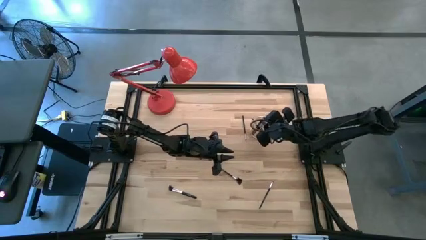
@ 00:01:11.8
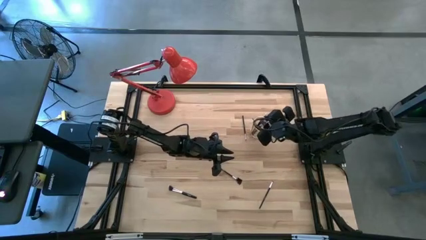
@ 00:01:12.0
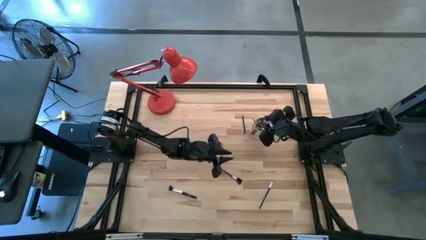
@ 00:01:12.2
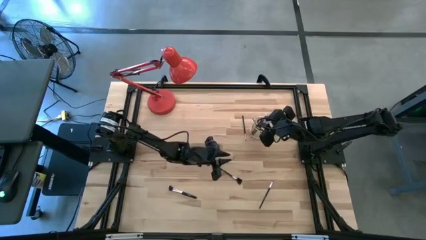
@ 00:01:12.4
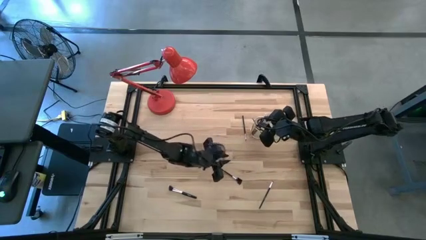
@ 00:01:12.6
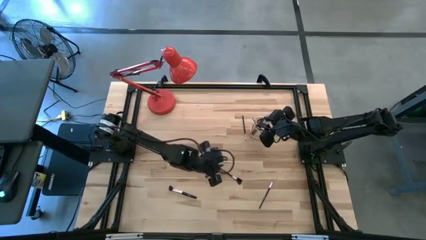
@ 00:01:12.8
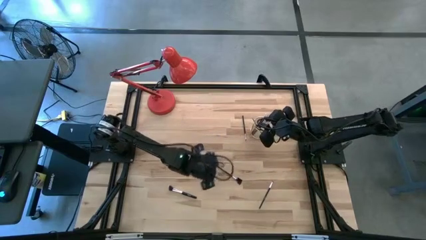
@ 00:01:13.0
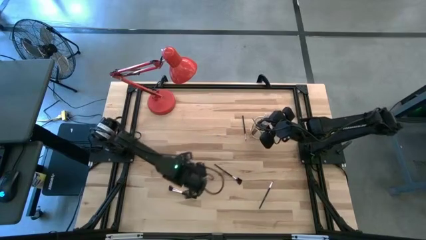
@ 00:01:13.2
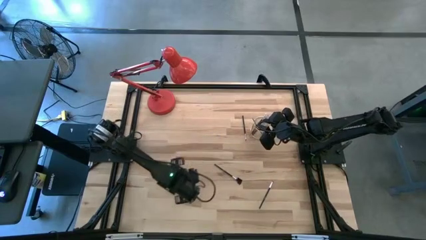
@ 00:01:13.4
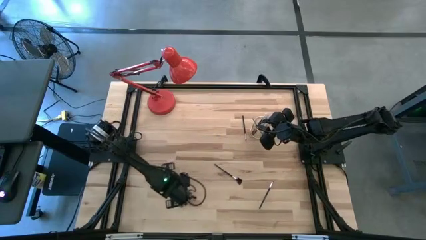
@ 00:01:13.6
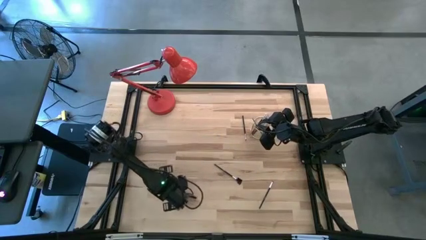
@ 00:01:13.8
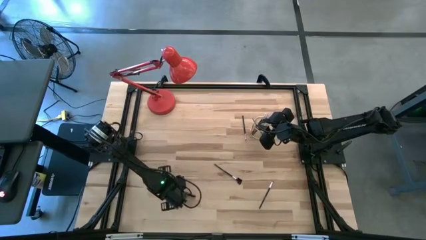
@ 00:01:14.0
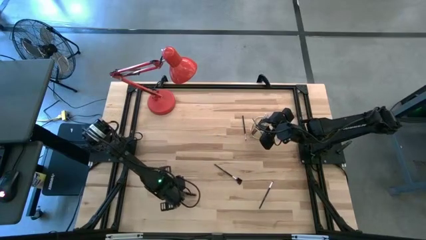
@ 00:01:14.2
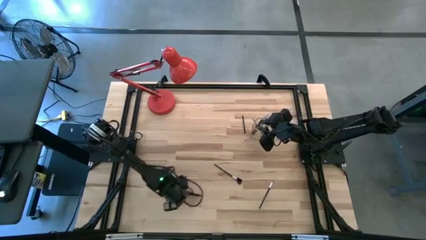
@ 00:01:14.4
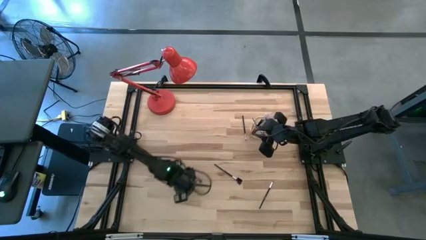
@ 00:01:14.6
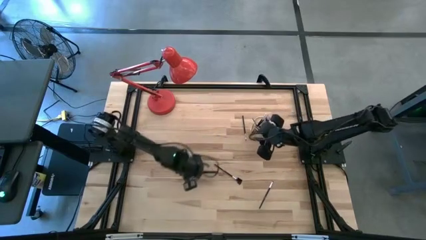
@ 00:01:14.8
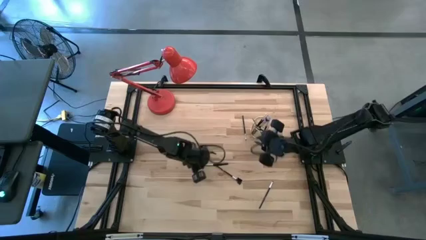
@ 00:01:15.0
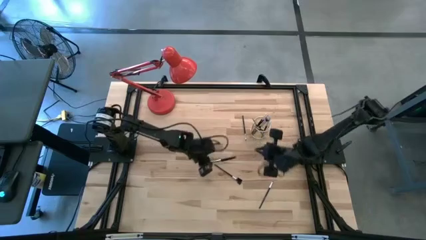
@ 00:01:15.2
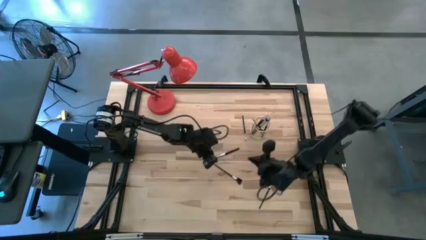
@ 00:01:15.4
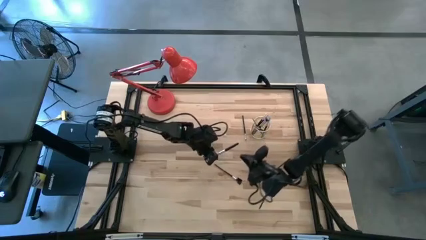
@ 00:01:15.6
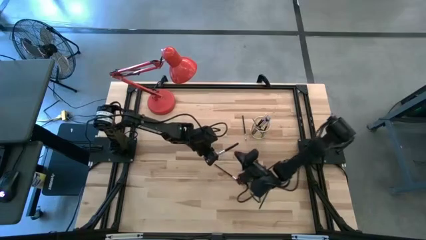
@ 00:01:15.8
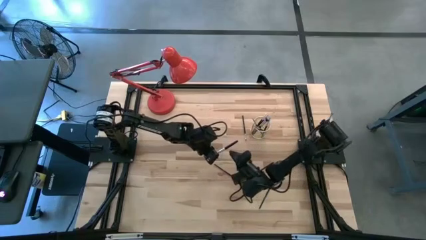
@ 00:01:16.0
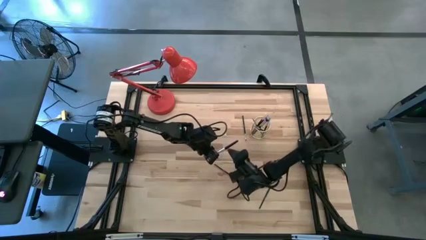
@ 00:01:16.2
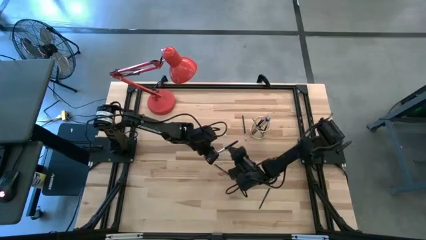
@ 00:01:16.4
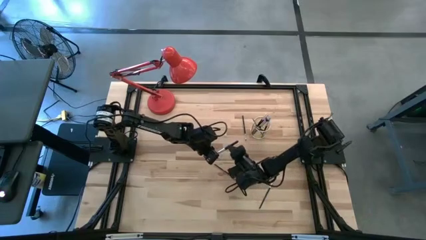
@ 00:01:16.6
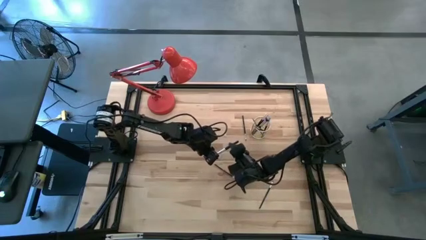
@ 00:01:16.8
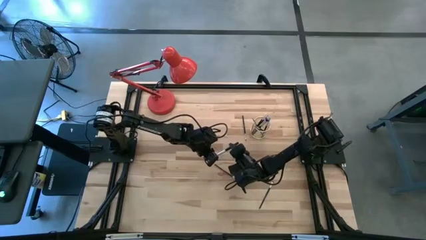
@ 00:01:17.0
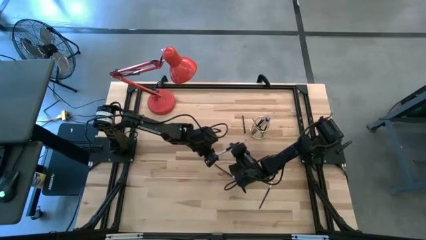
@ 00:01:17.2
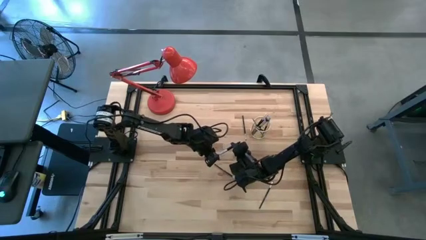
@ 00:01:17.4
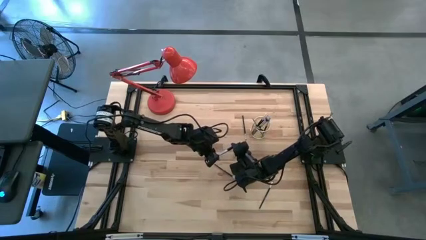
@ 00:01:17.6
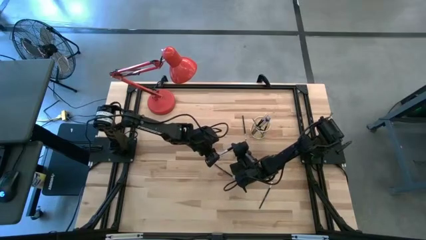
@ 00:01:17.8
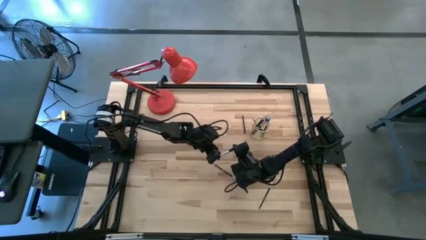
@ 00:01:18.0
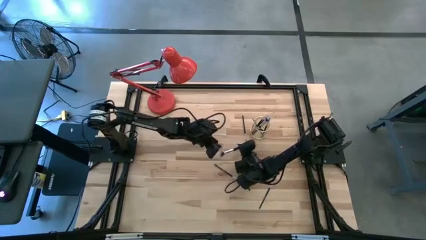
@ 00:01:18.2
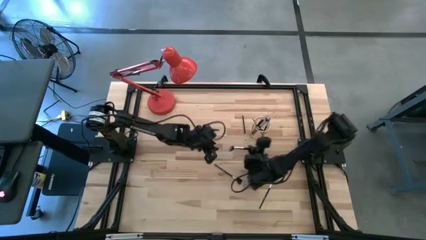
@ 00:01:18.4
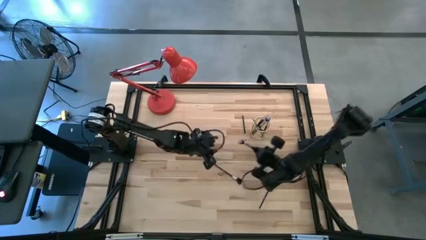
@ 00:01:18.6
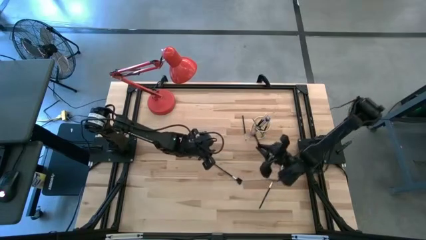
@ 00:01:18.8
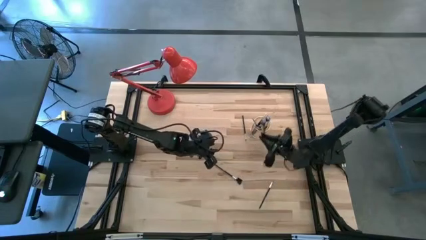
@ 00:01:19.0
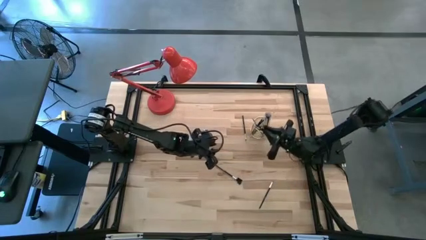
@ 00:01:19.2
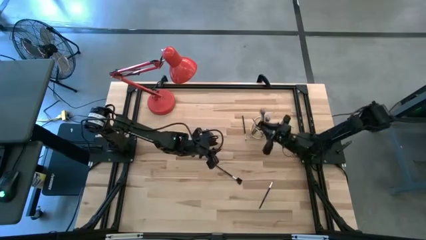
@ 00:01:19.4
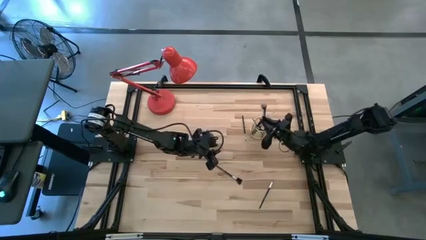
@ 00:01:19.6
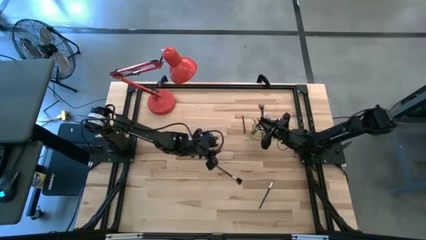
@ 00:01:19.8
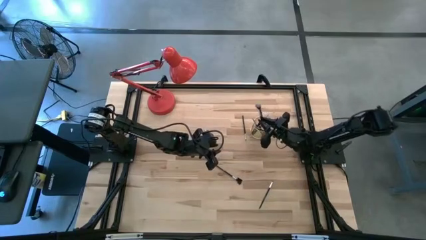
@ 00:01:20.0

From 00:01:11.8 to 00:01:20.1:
Task: Put items in baskets/containers
Put the black brush into the gold holder

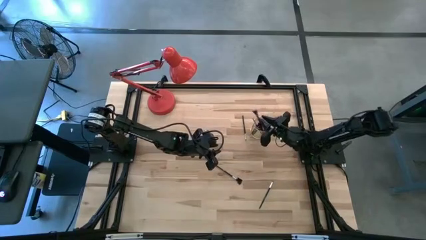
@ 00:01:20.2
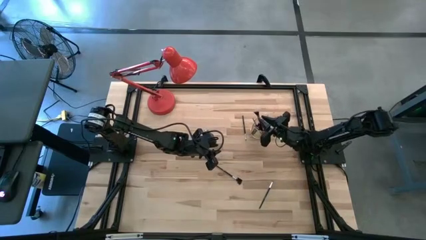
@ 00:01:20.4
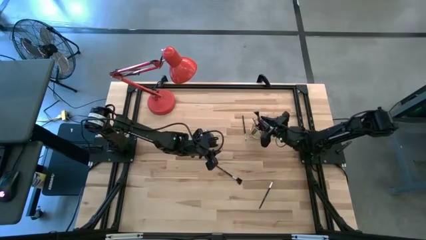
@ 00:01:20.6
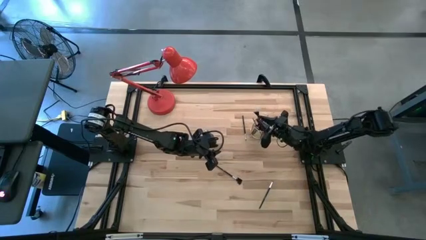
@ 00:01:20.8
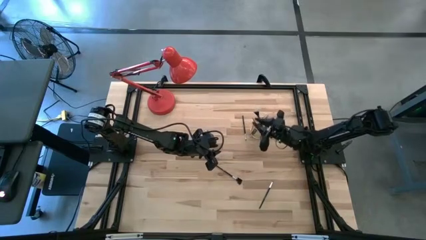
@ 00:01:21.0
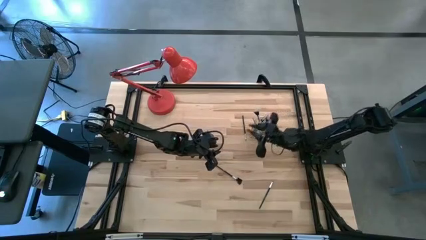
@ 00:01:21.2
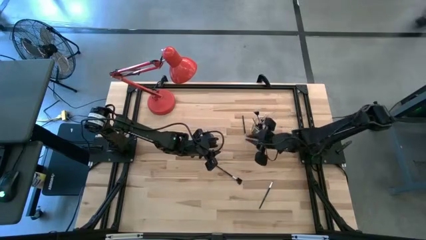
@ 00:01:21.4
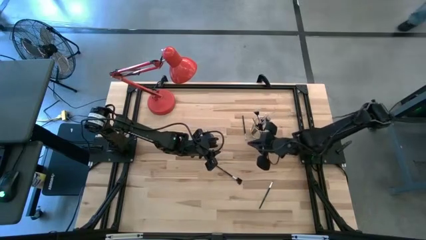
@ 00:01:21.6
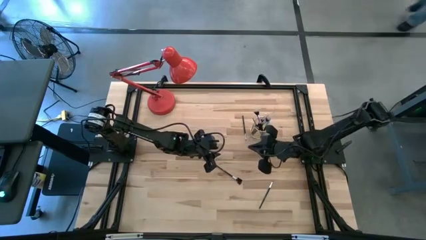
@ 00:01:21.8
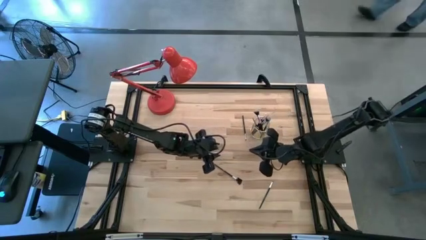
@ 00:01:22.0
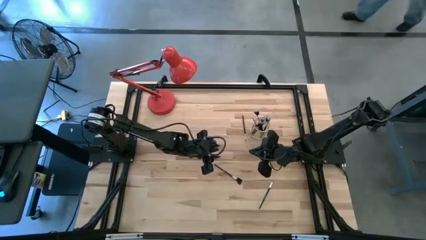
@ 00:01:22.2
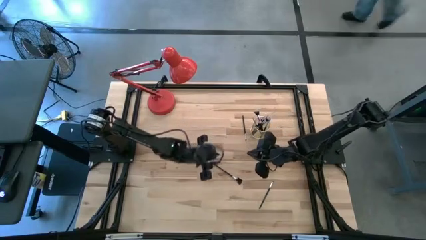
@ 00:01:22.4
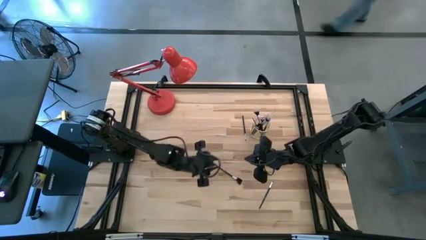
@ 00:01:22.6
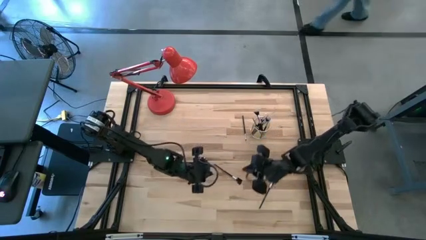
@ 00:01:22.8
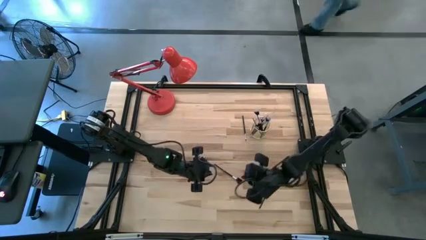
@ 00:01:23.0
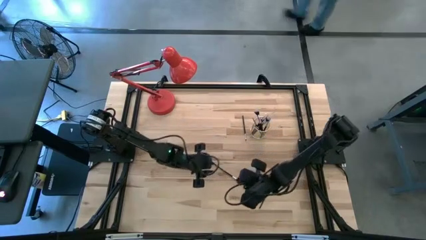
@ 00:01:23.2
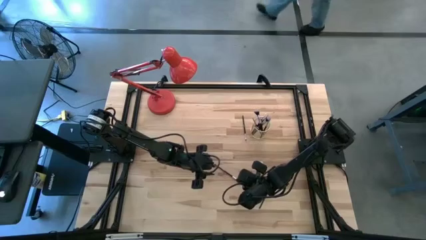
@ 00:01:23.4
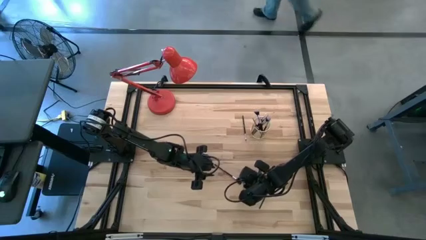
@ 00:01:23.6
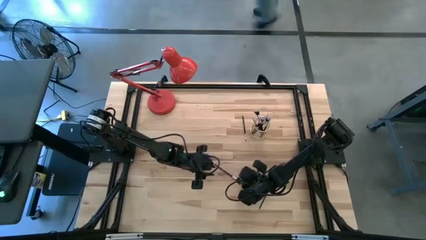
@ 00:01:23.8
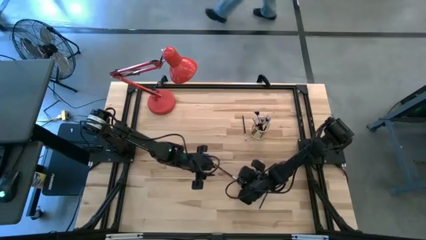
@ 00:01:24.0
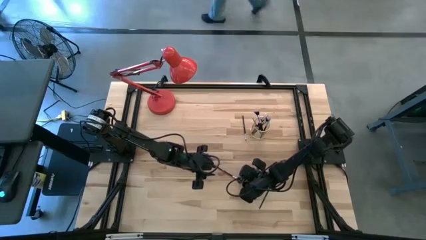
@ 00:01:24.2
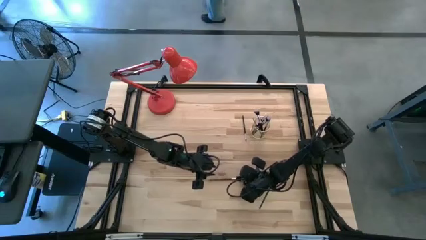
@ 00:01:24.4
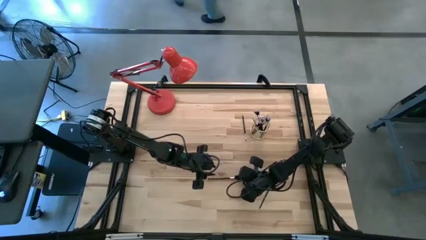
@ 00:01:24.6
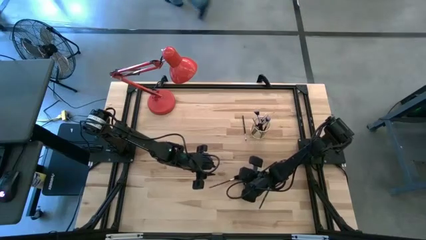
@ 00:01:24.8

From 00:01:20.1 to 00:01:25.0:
Put the black brush into the gold holder

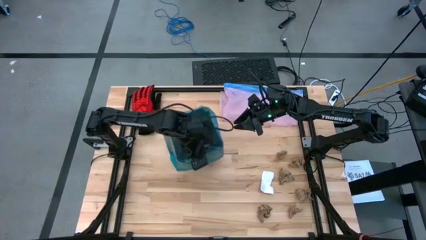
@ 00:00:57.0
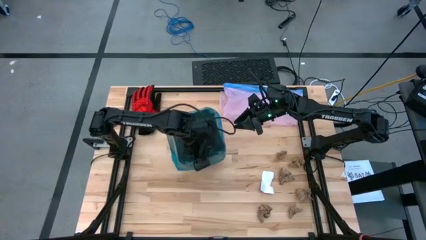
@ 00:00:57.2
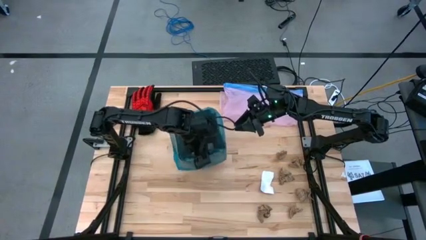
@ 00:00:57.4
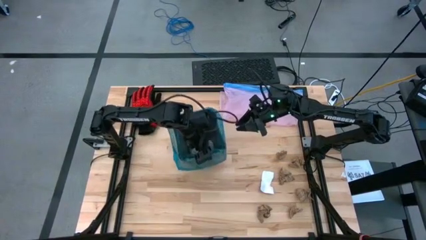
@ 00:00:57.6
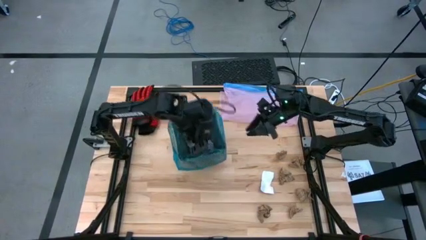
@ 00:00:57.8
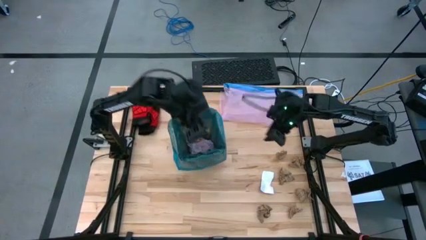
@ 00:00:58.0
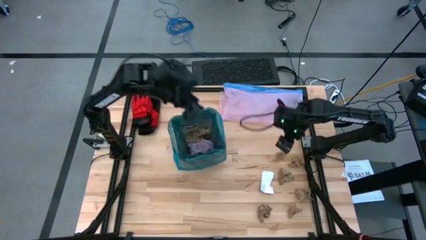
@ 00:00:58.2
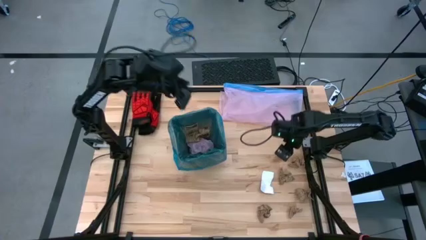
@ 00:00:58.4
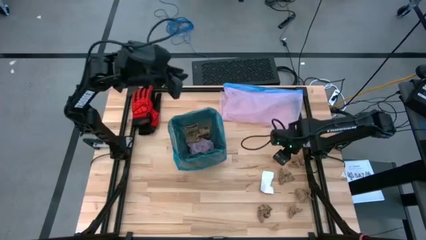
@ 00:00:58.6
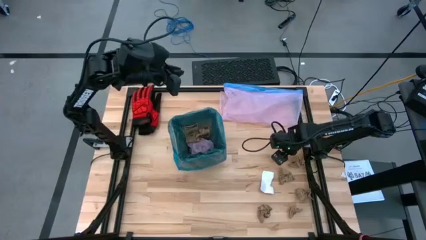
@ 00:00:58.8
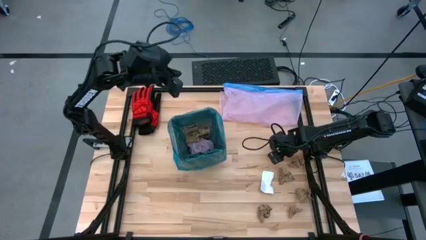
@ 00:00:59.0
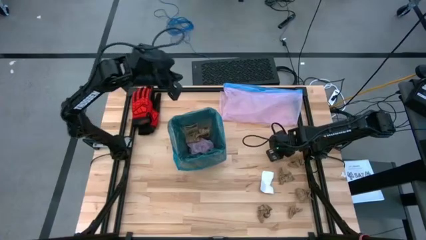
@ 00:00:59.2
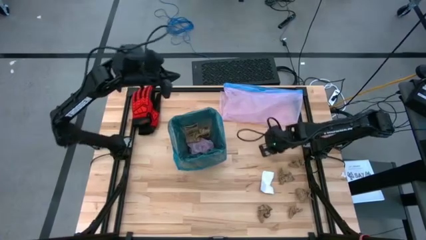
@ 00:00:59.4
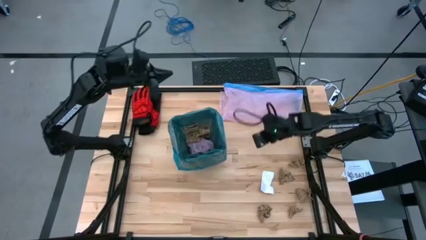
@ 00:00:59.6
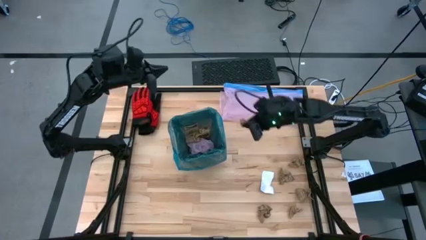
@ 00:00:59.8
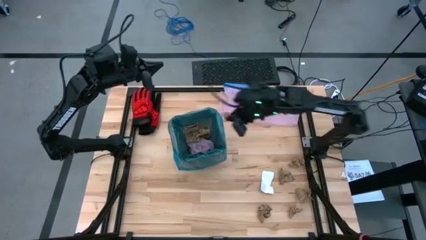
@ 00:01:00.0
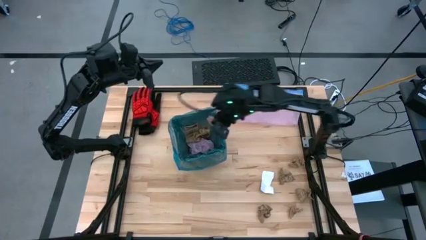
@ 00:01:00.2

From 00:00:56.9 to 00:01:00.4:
Task: place trash/remove bag and relplace
Put the brown napkin into the black trash bin
